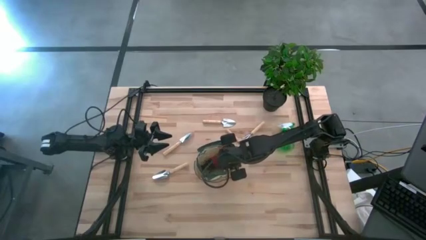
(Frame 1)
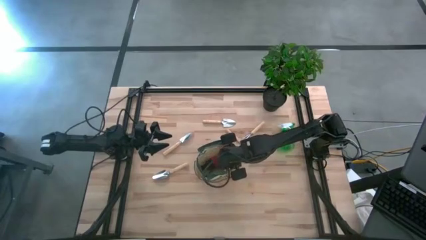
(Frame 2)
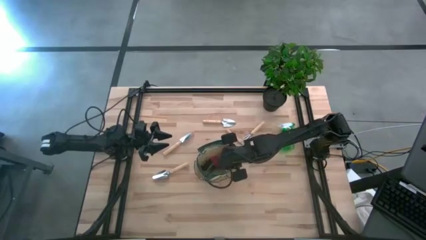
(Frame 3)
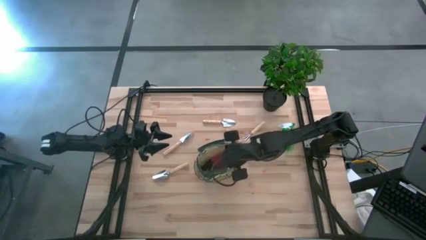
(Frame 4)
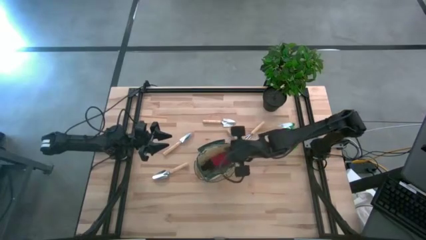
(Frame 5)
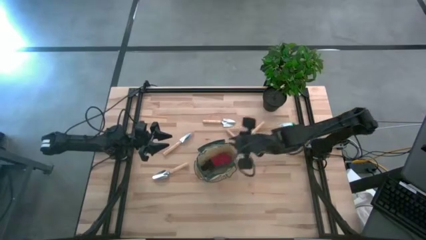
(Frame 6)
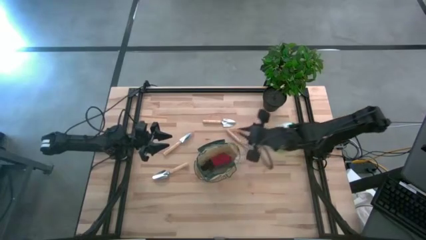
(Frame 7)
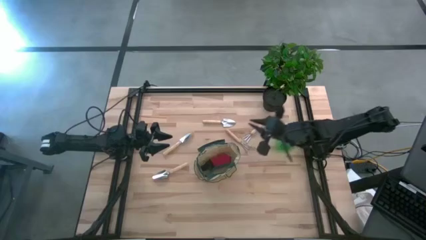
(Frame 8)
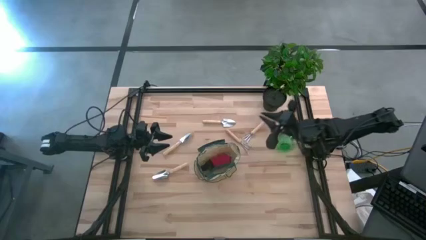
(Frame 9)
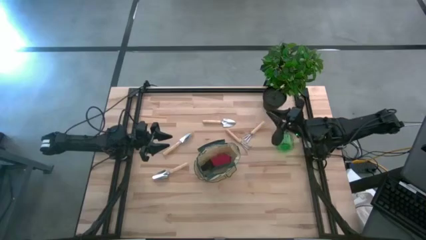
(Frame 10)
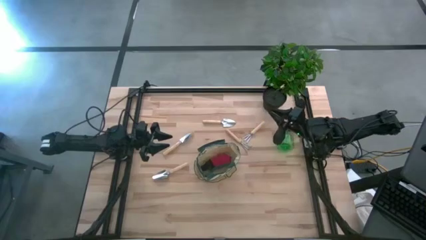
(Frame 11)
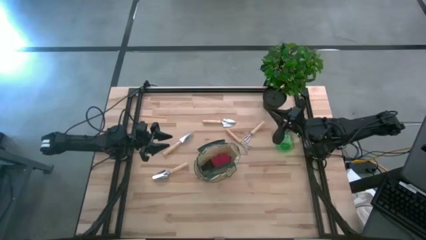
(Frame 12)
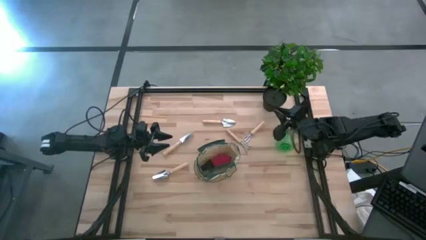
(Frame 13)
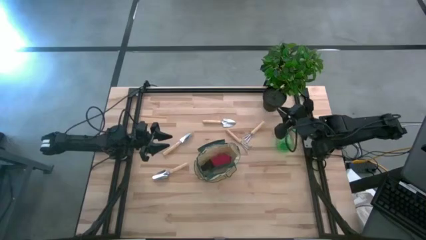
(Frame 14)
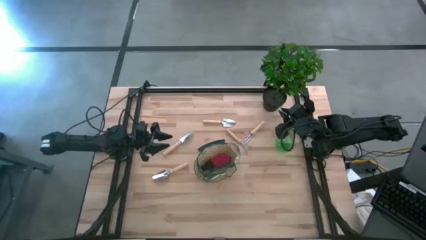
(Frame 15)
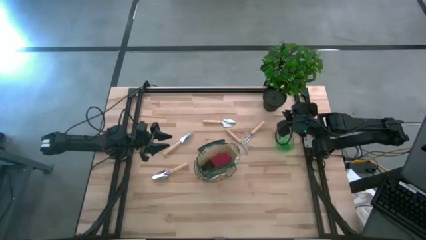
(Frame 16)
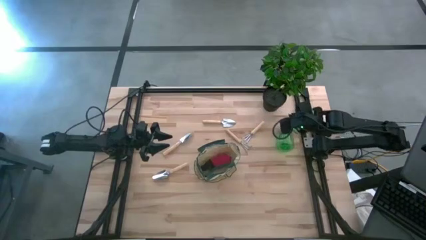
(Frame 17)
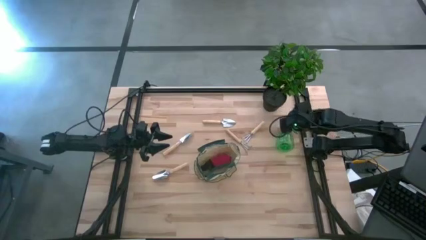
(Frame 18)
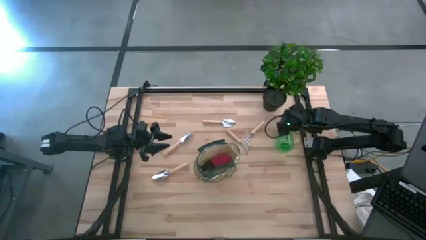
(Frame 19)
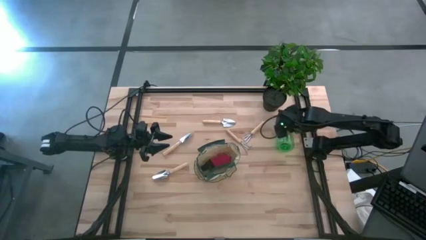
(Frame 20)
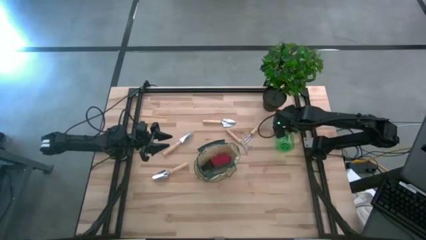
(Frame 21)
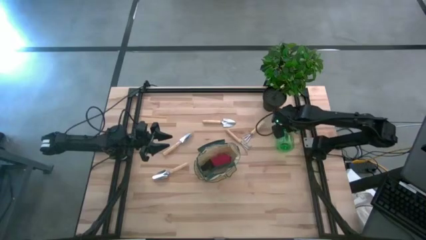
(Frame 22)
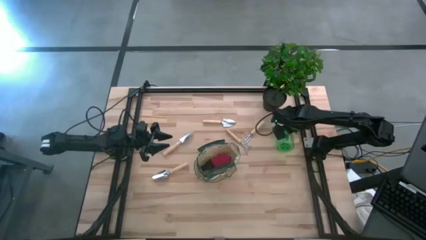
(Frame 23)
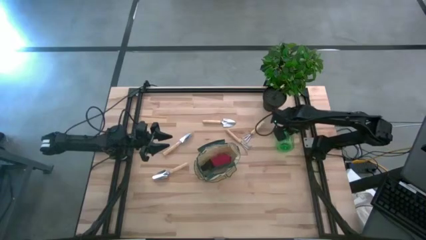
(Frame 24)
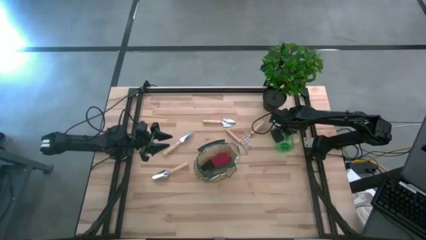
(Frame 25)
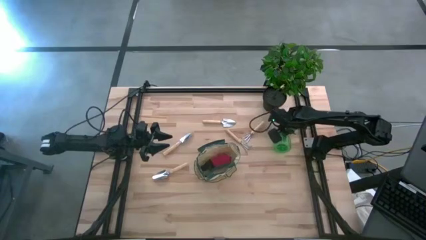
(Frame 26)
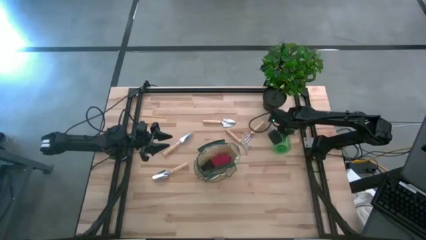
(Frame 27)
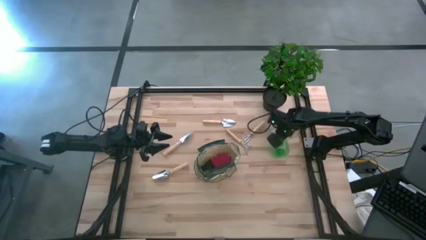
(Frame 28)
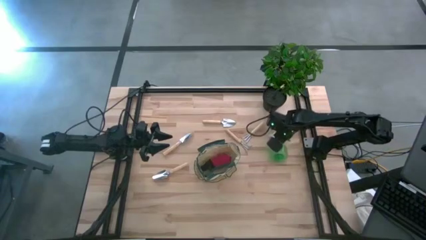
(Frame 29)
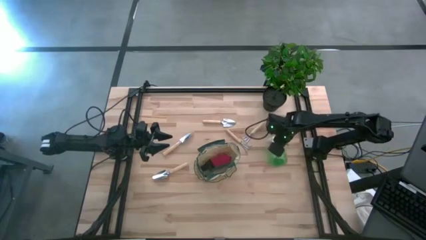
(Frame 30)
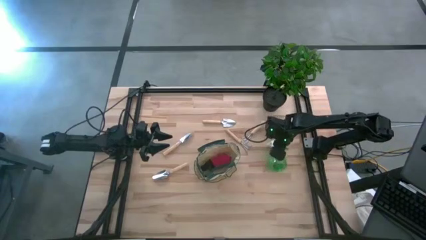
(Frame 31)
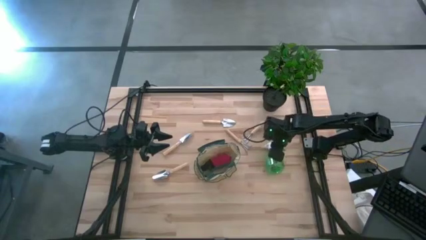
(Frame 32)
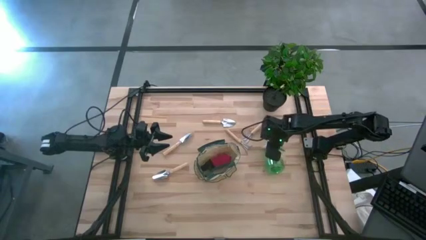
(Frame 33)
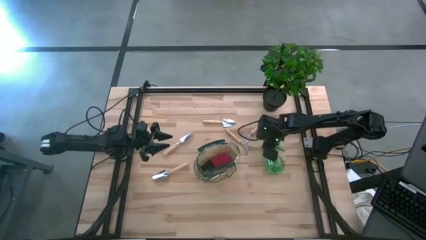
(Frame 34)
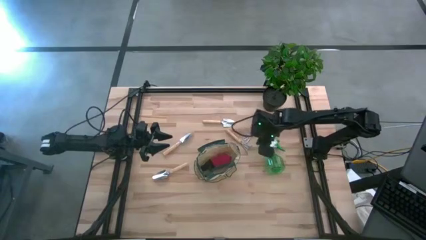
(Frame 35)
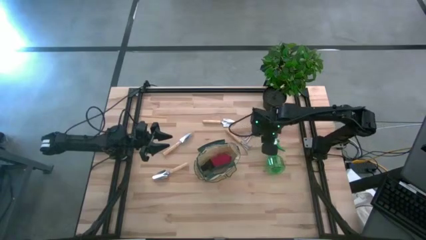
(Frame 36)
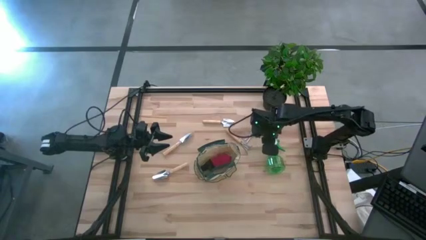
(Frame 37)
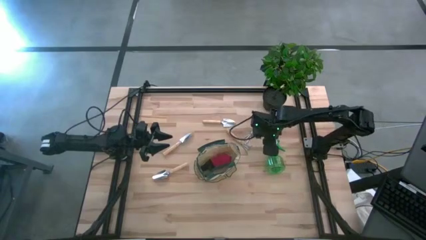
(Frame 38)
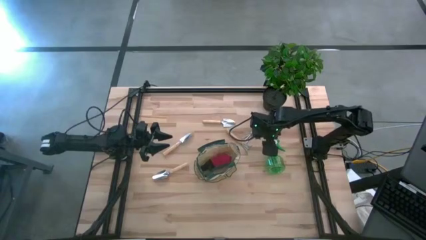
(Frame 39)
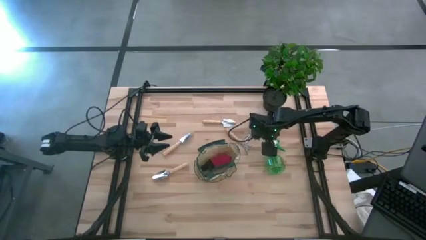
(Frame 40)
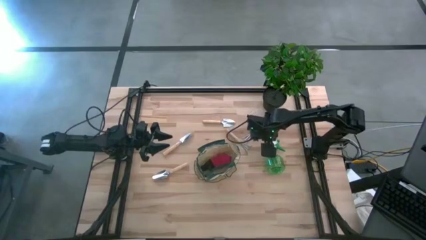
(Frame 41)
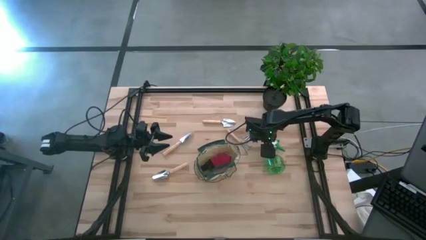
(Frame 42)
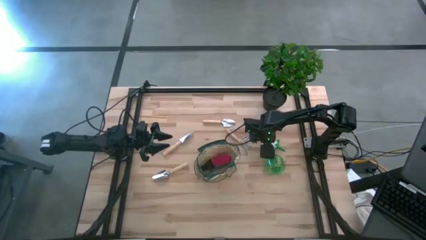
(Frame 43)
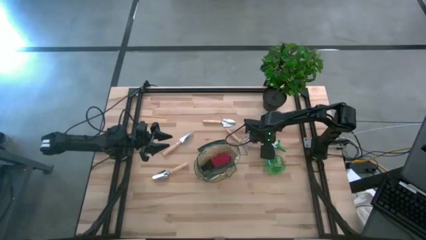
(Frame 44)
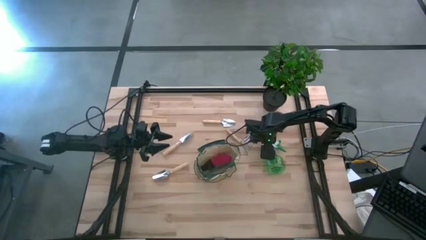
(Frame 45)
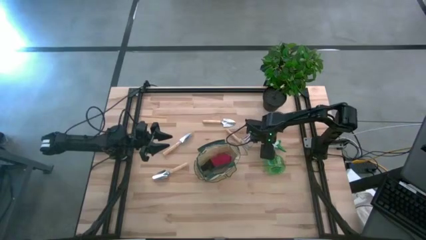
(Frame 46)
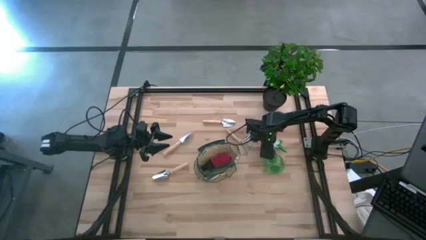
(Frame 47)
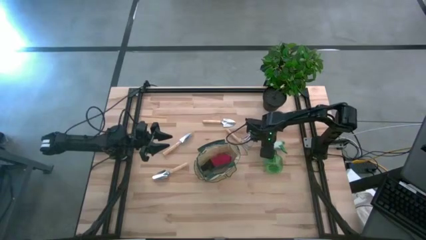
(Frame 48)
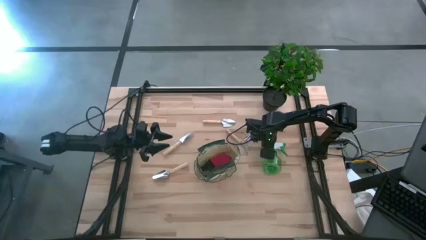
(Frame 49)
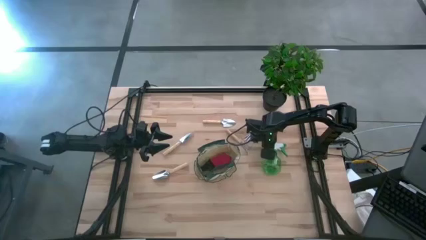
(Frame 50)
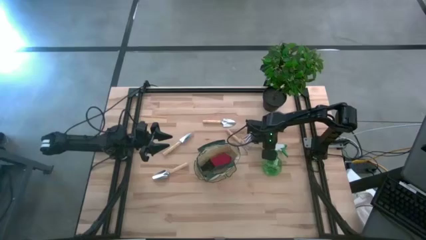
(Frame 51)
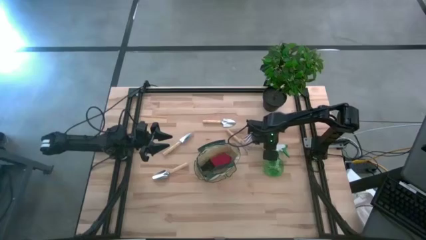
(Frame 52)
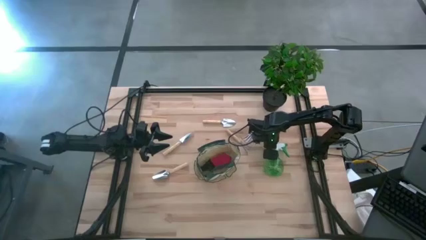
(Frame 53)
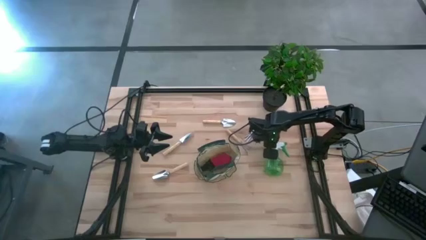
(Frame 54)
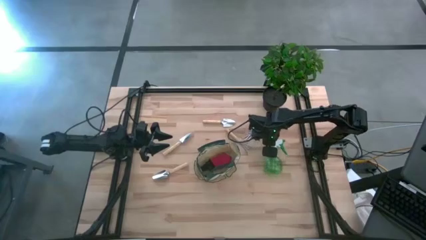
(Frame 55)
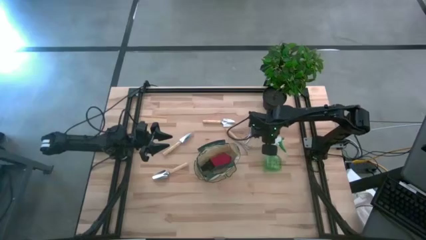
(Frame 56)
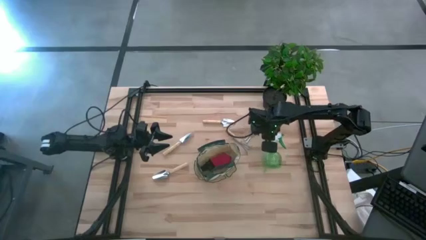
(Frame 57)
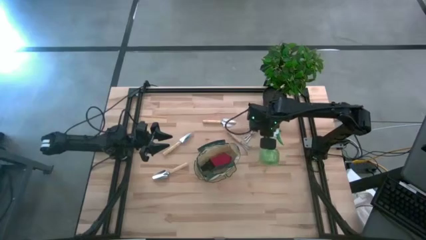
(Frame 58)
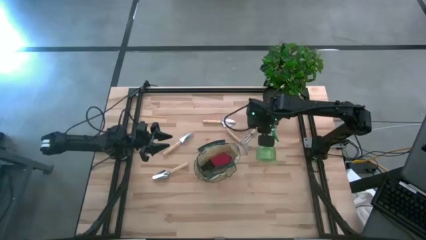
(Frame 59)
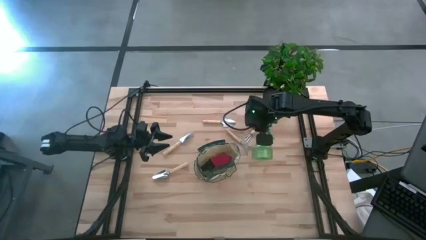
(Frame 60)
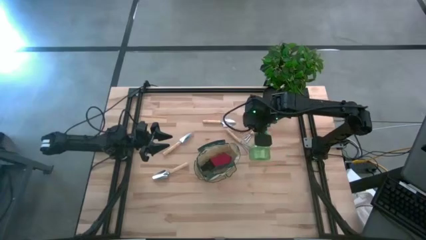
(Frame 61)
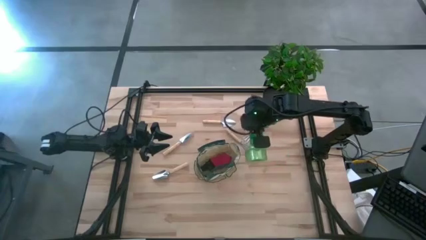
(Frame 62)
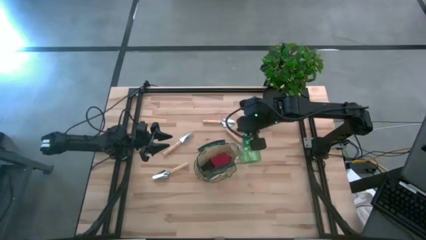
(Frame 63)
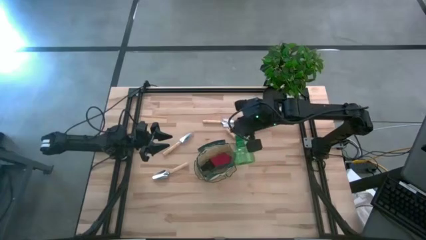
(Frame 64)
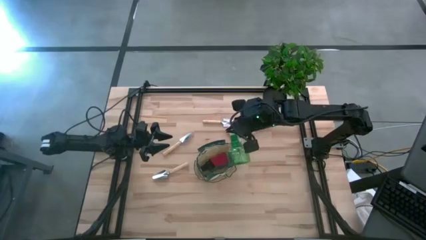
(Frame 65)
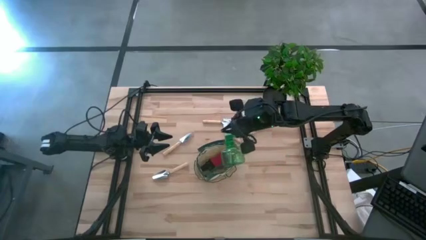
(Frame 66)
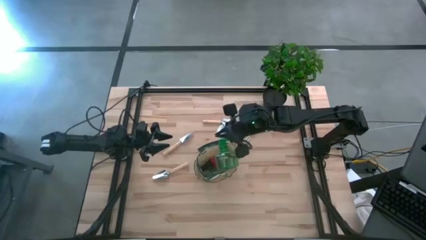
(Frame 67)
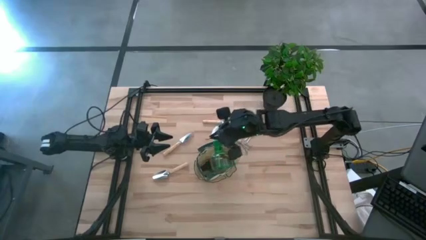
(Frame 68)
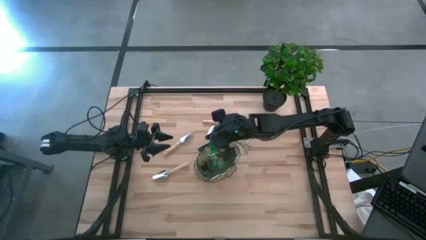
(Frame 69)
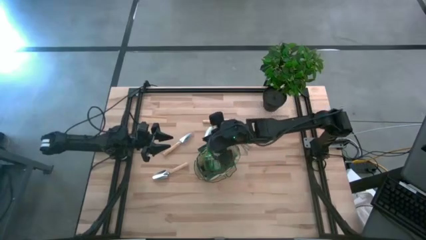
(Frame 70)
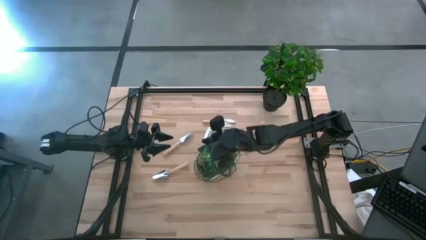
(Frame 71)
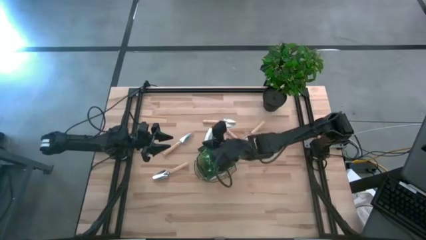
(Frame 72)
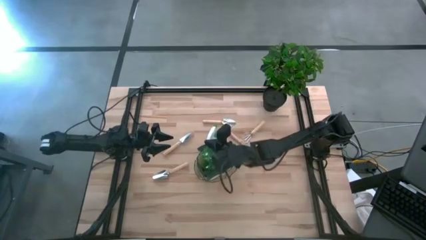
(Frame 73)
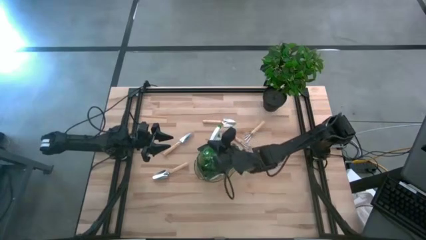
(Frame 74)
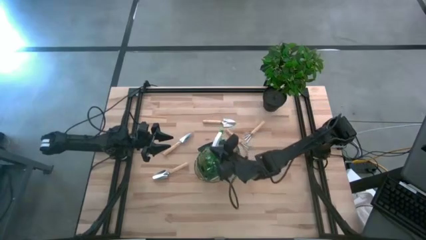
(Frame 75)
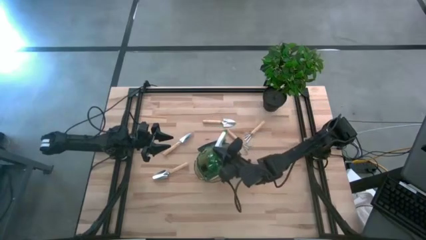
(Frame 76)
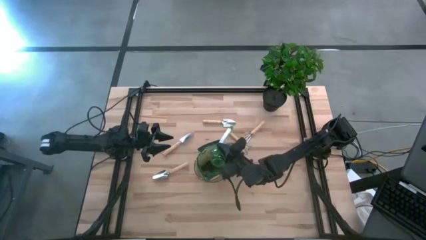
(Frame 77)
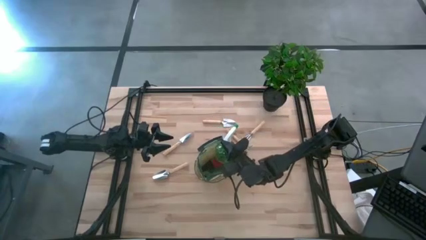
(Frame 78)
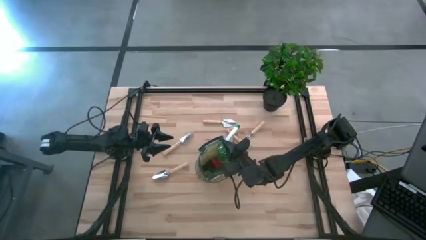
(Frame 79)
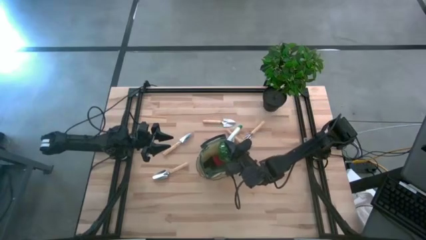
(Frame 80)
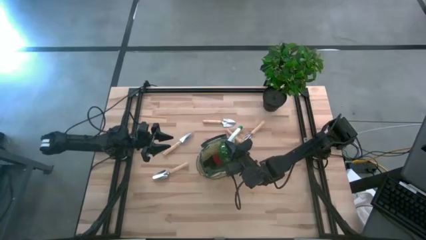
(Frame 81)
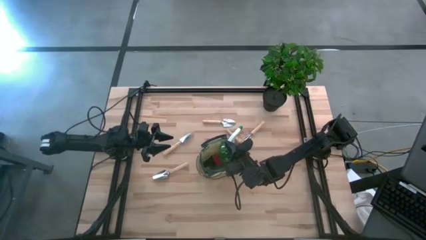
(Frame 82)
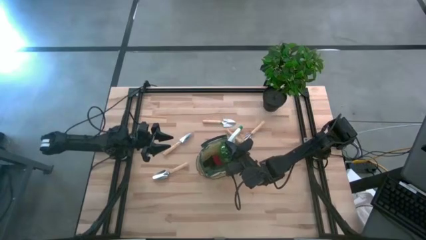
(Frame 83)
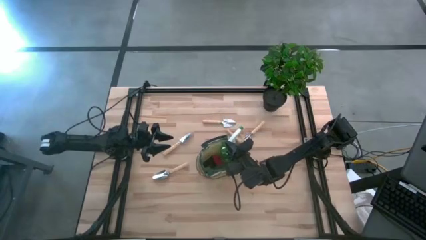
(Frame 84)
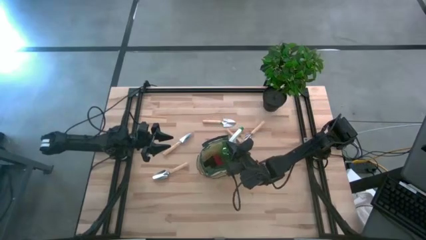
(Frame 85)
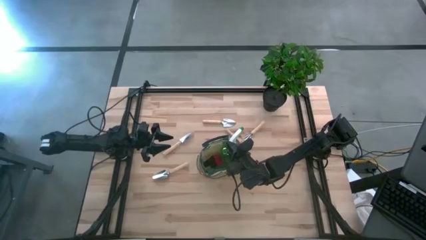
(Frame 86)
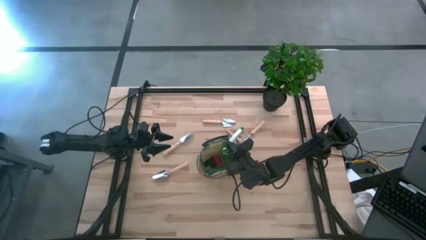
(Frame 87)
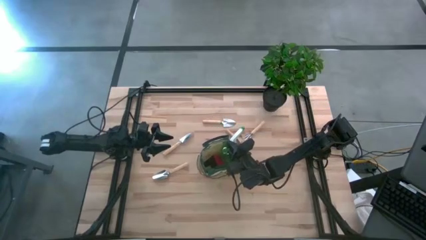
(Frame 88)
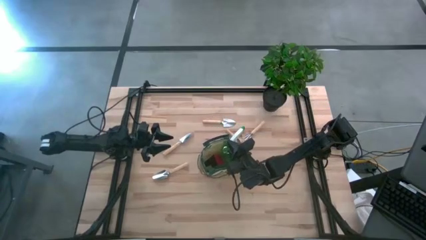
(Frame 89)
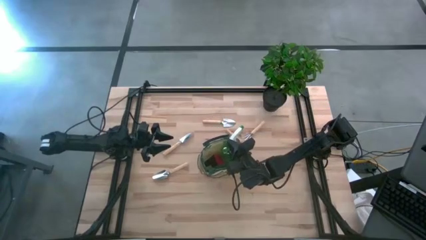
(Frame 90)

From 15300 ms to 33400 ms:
Task: Pick & Place Garden tools in Gardening bag
Put the green spray bottle into the green gardening bag
